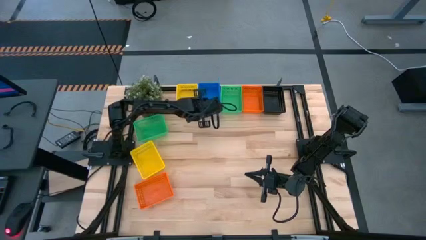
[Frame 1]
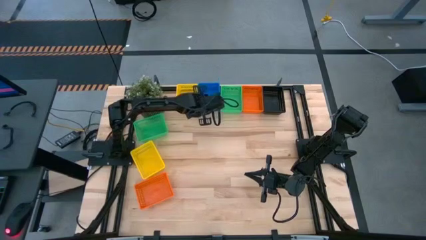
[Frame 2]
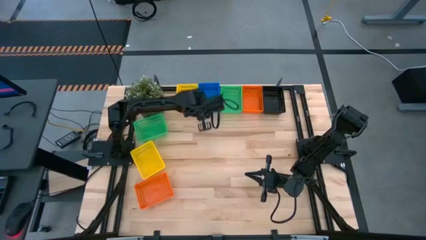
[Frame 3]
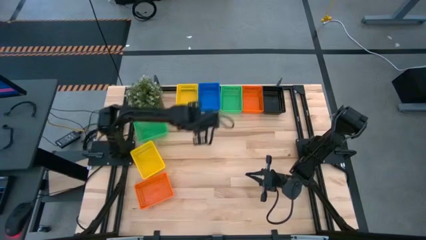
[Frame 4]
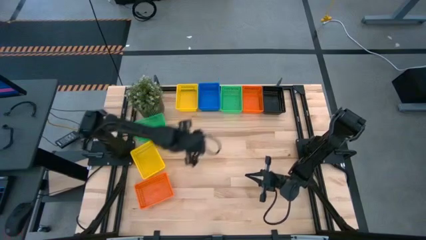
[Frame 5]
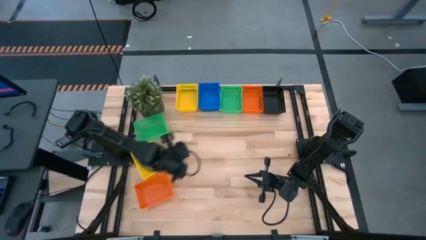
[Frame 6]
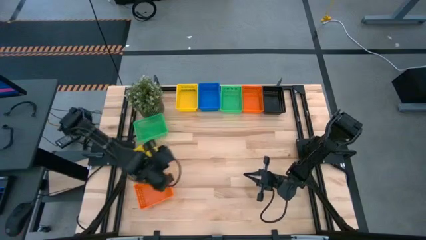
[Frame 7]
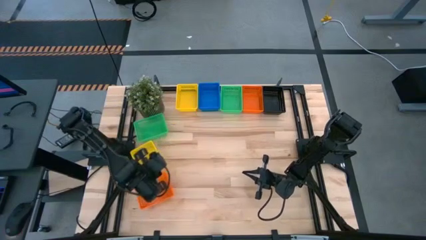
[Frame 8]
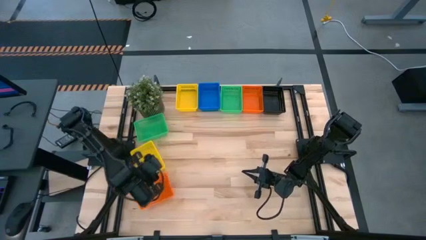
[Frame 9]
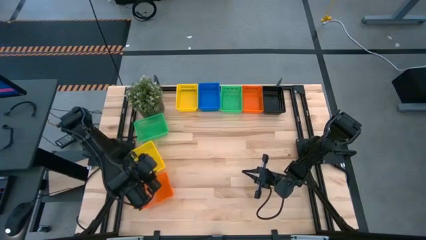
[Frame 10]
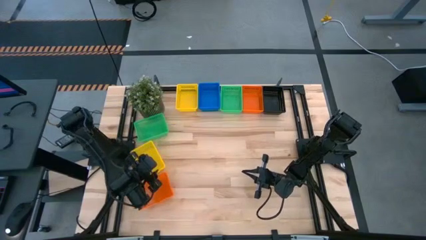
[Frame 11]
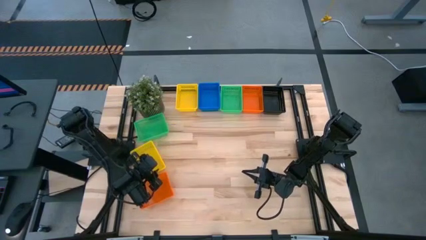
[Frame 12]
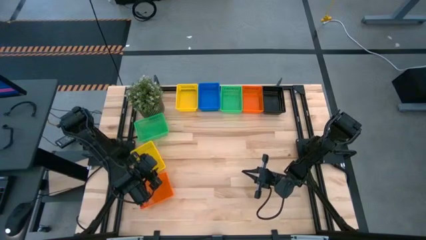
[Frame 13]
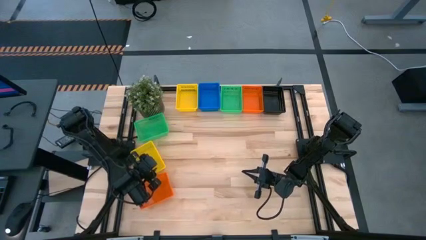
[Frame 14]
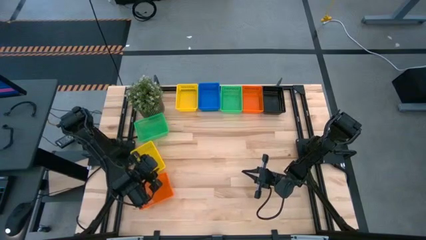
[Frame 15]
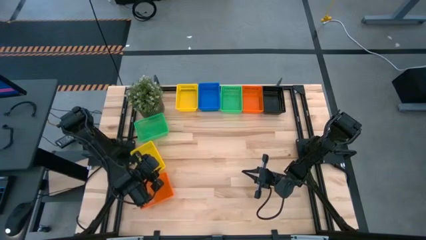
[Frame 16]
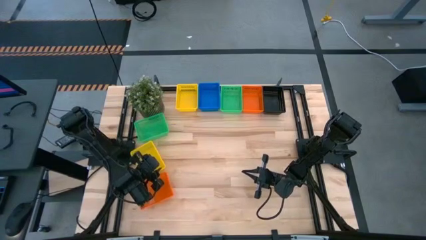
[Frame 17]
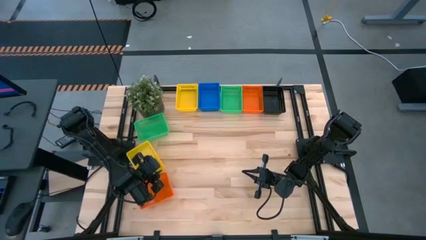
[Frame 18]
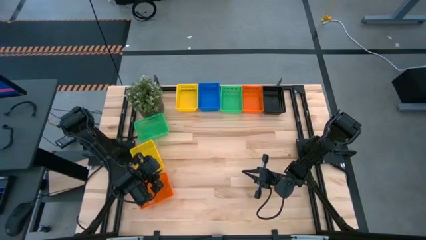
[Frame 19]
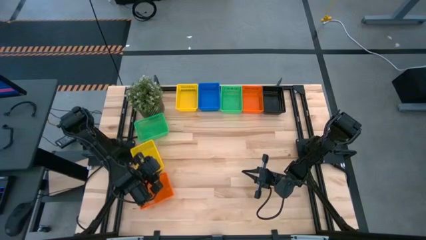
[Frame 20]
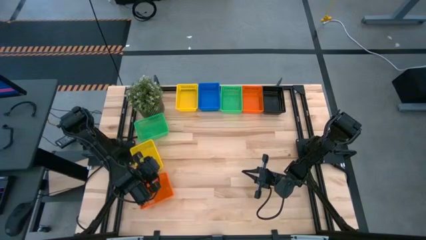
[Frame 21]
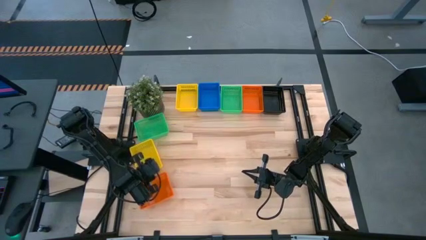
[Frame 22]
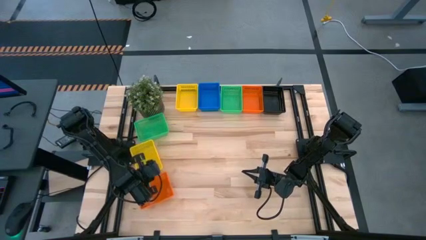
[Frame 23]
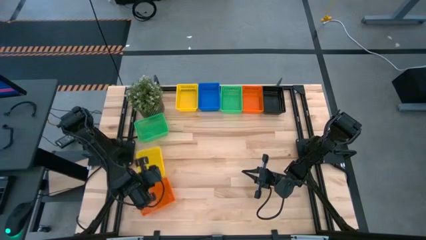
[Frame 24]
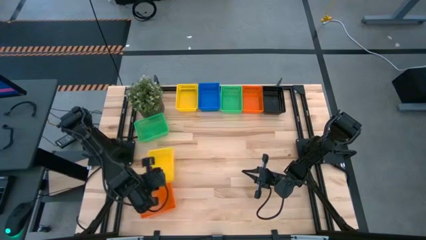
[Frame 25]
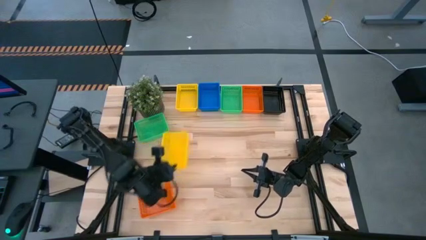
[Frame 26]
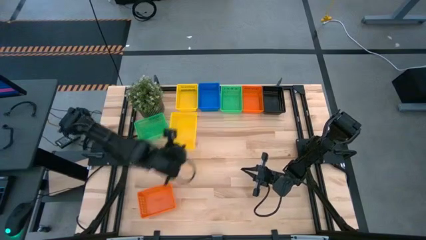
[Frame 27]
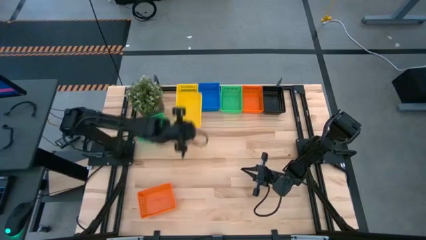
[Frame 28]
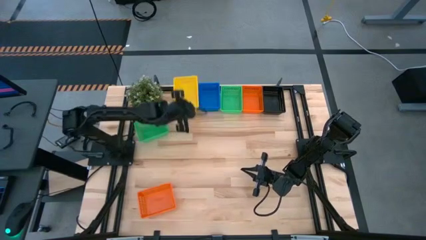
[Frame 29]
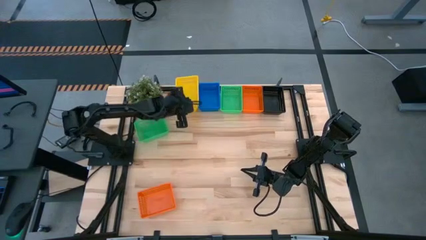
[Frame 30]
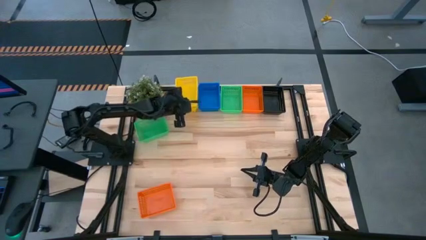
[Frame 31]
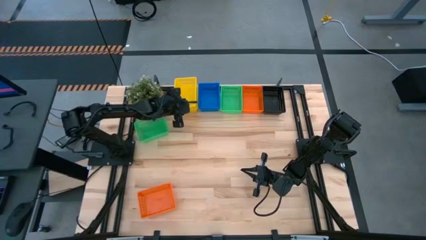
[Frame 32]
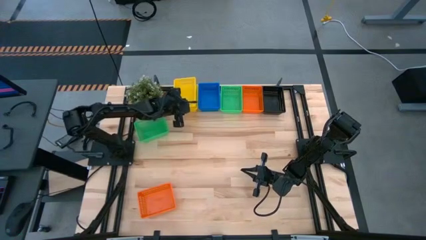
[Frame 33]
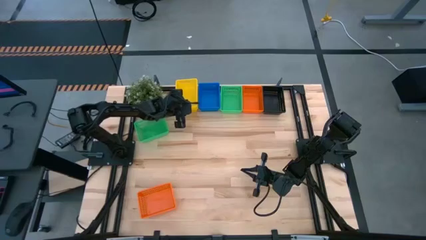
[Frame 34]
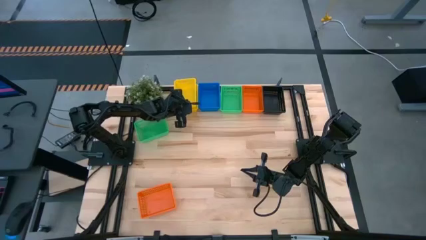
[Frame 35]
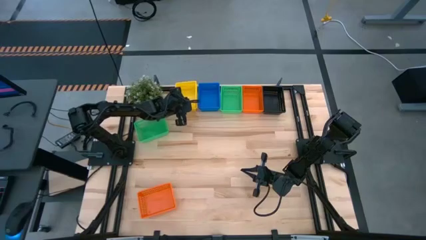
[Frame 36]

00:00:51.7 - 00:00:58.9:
Stack the bottom yellow bin on top of the yellow bin

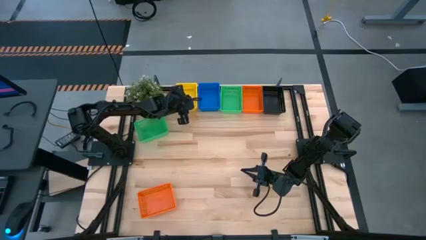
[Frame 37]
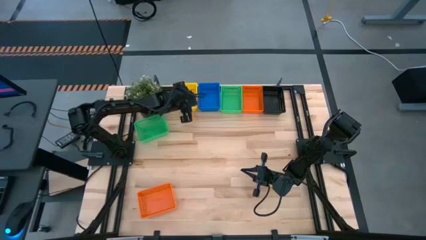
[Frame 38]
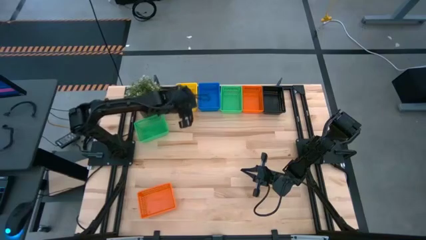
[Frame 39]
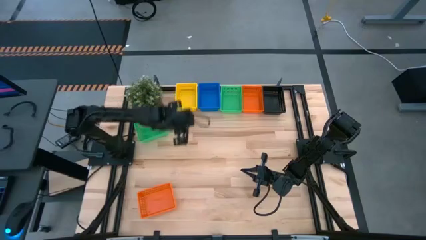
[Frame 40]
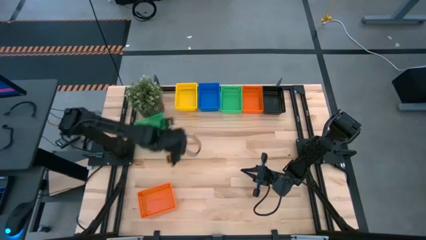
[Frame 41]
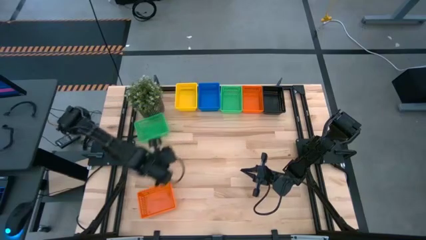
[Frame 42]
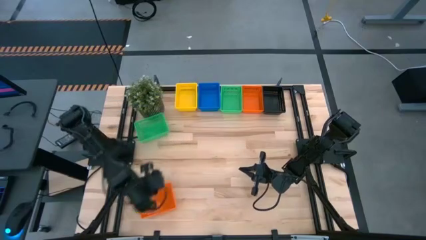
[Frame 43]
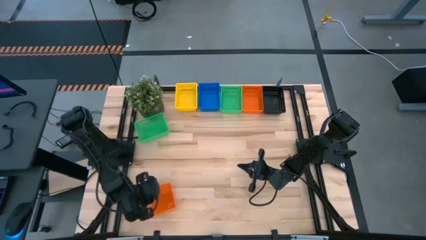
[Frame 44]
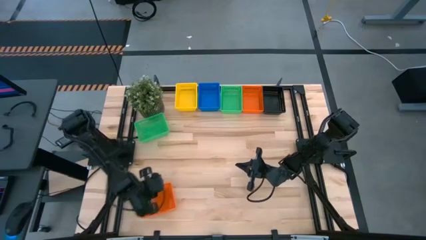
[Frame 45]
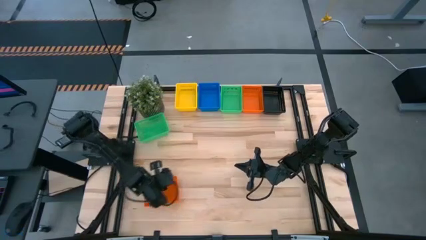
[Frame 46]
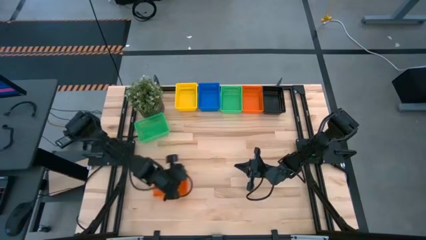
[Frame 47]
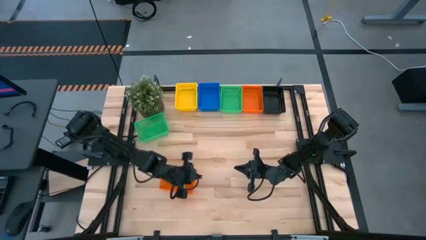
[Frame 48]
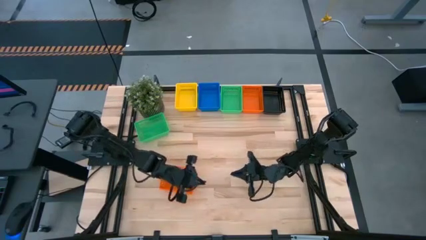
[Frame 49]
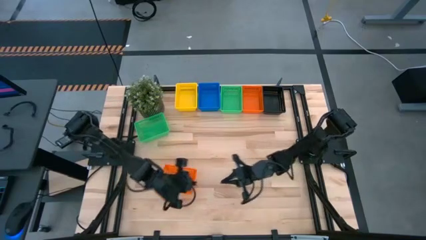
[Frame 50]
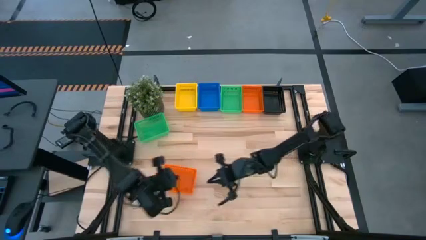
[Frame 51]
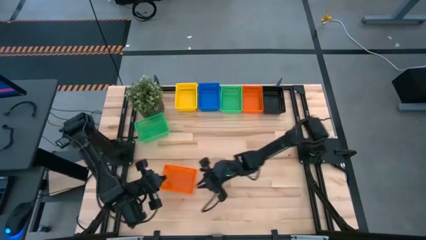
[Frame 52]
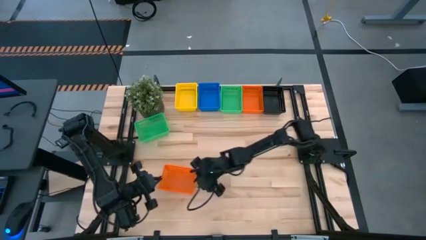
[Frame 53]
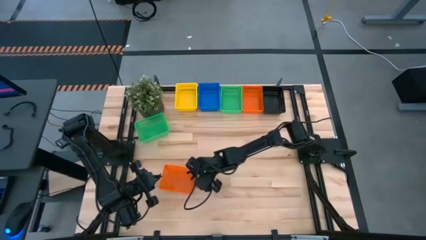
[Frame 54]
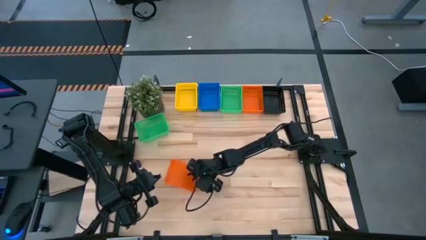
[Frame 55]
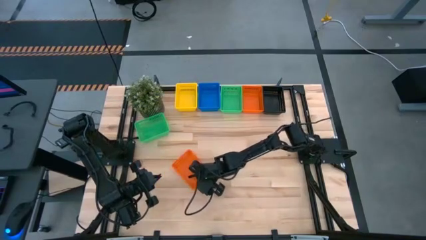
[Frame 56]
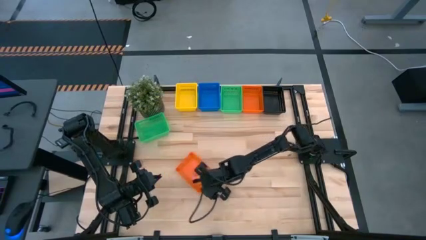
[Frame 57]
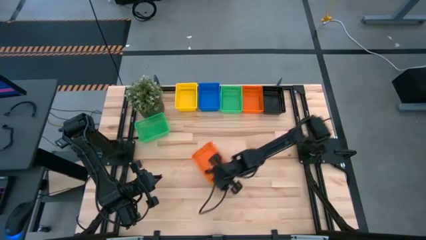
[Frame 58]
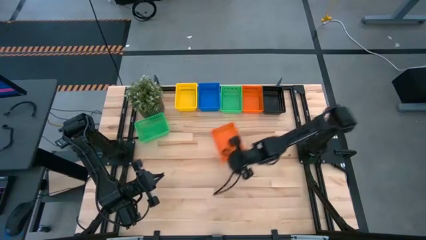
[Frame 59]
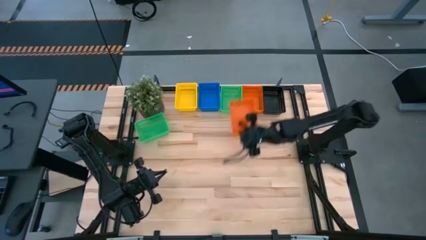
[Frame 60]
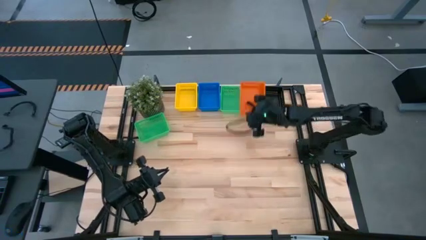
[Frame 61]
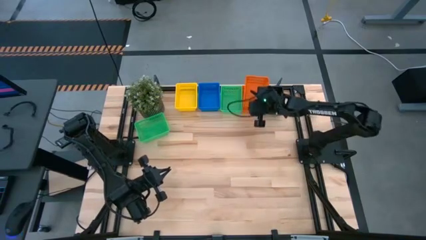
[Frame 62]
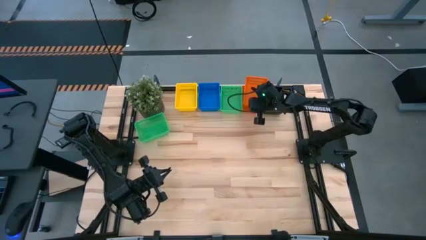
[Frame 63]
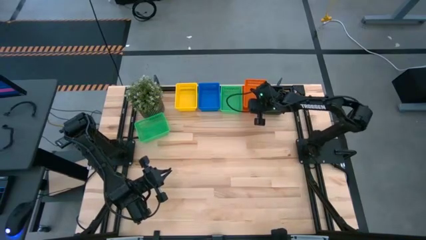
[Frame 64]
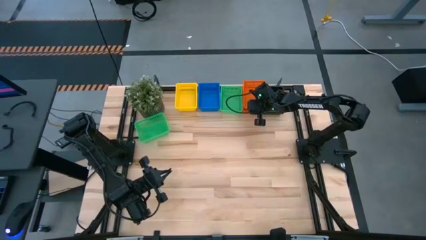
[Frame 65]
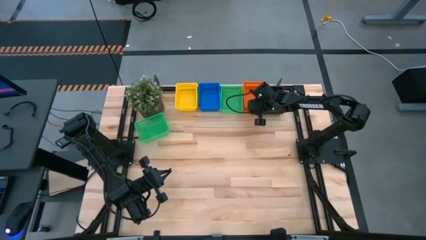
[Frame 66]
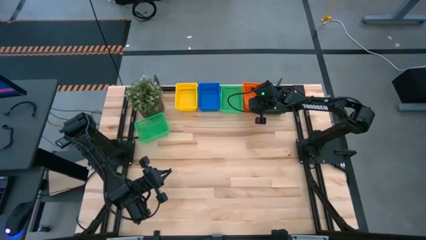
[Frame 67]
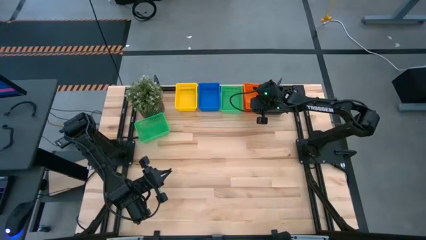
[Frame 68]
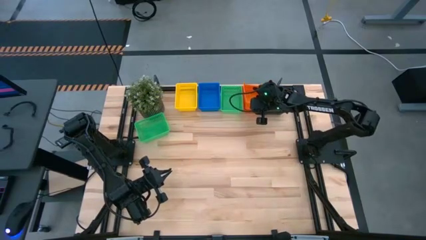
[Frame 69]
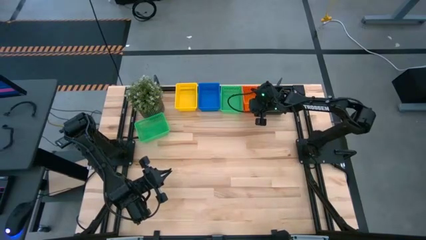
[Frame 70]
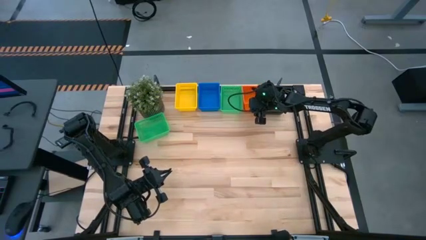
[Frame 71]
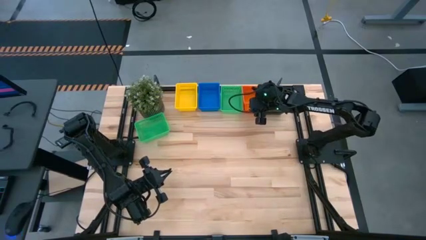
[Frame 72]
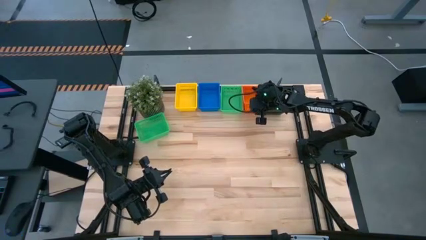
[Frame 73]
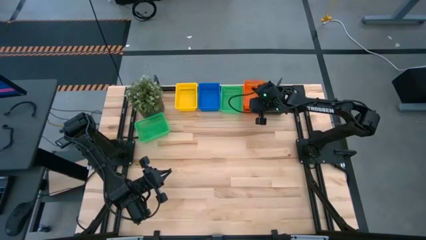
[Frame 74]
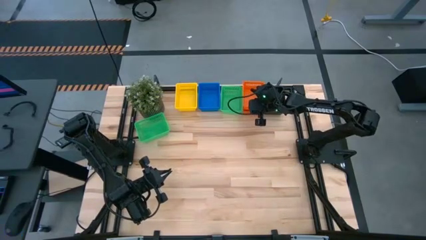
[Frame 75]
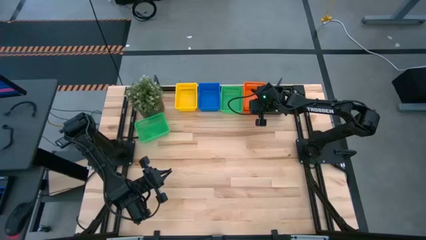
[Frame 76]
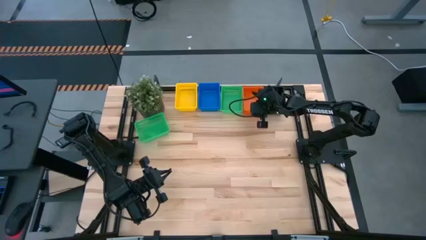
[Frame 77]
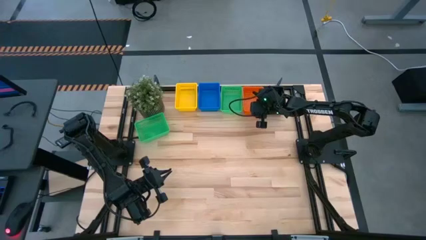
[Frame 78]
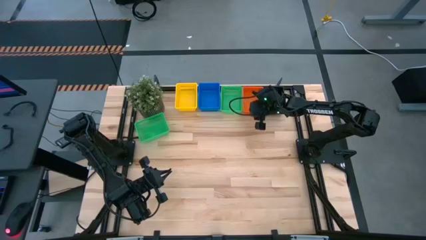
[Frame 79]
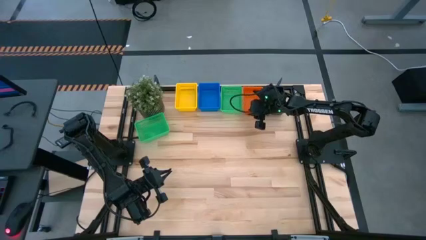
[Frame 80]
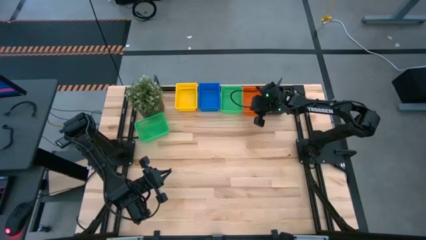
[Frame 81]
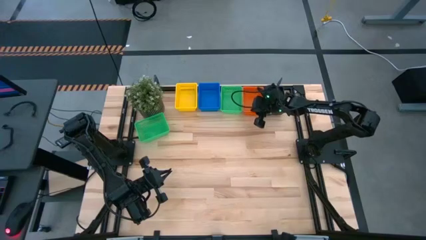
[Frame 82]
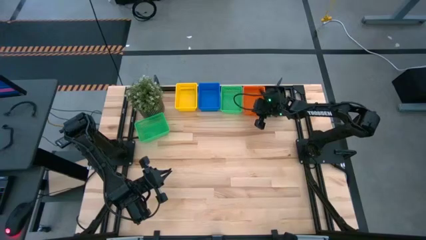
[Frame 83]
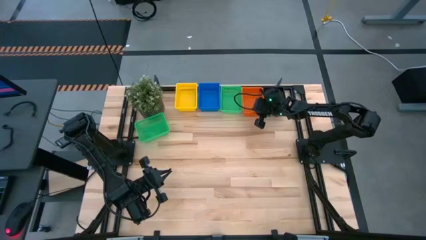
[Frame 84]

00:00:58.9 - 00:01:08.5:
Stack the bottom orange bin on top of the orange bin
